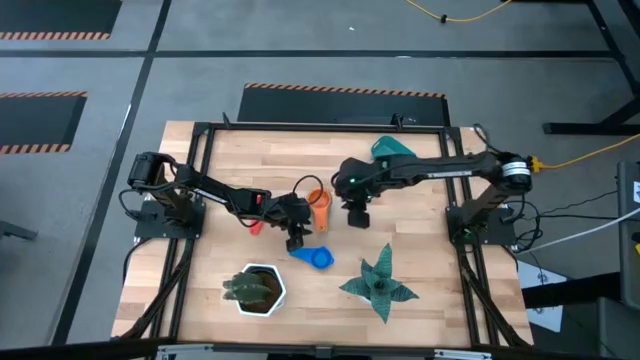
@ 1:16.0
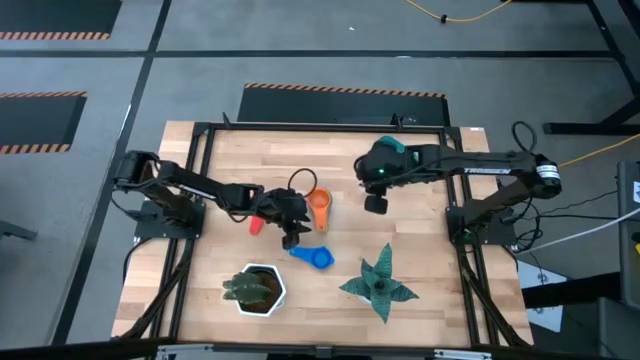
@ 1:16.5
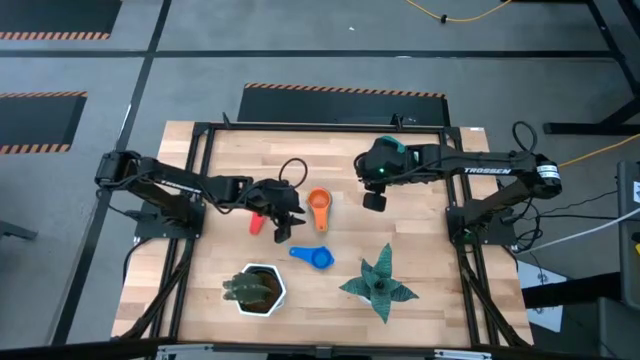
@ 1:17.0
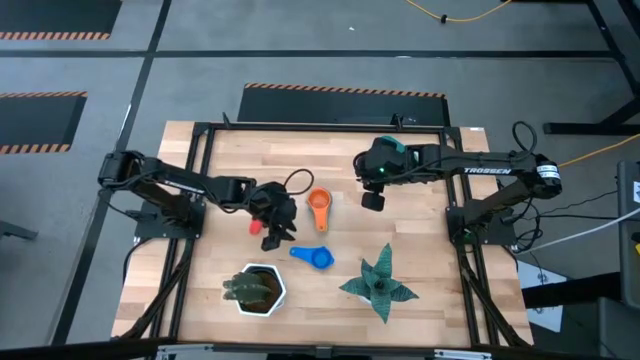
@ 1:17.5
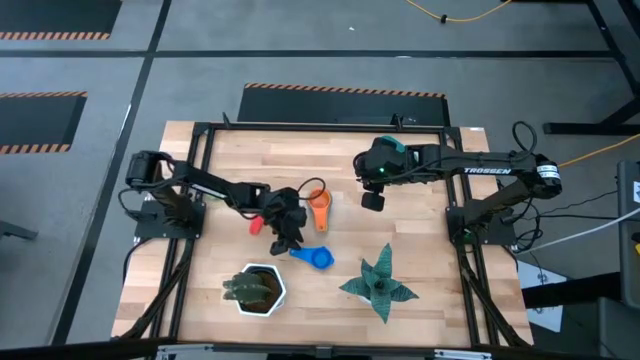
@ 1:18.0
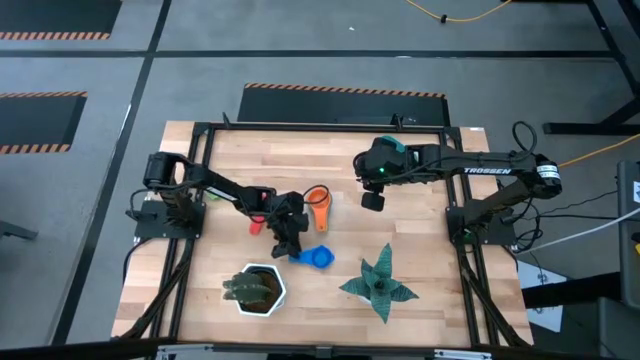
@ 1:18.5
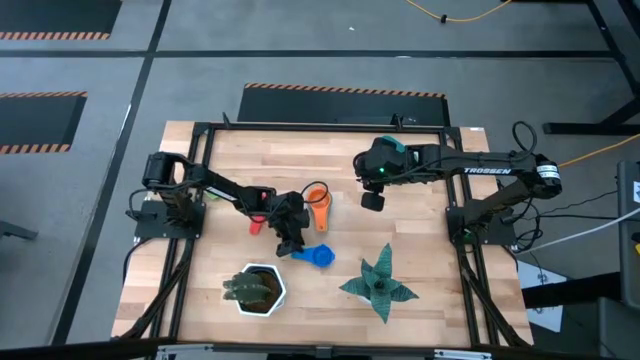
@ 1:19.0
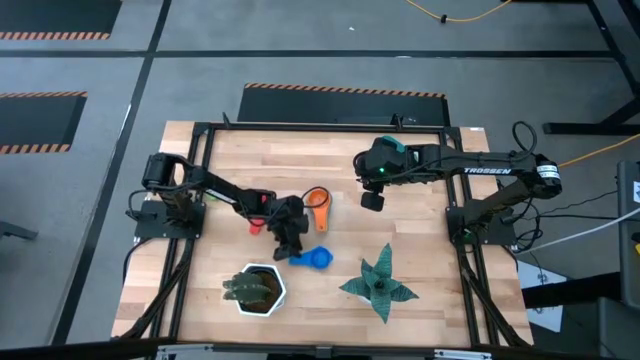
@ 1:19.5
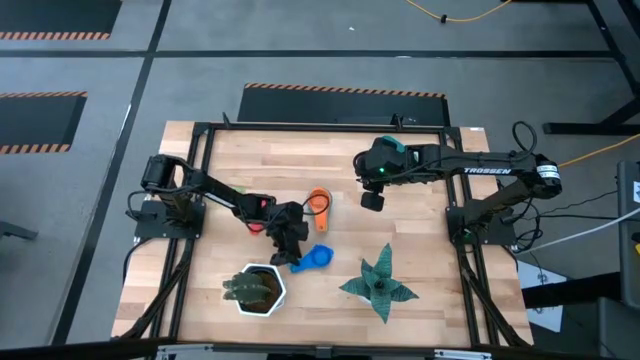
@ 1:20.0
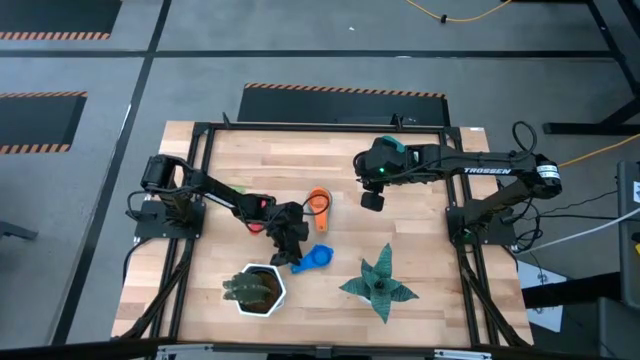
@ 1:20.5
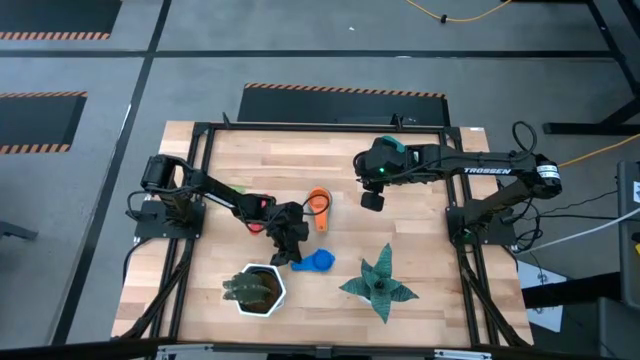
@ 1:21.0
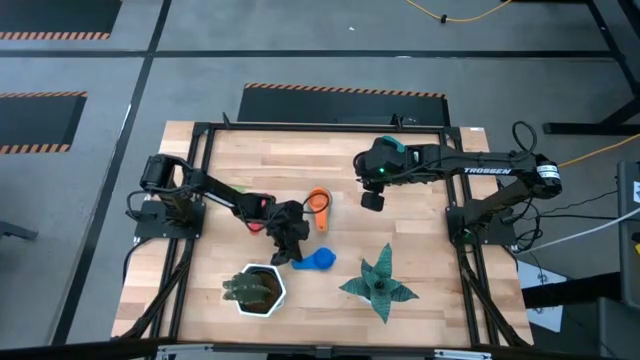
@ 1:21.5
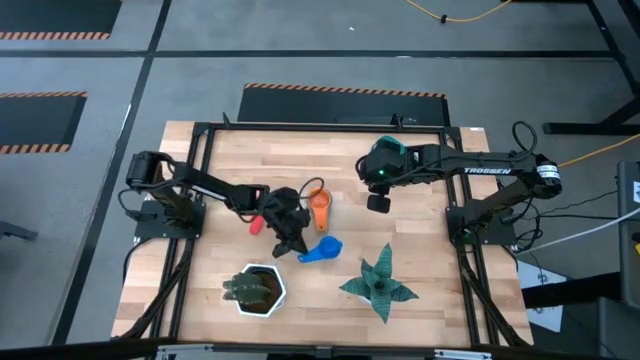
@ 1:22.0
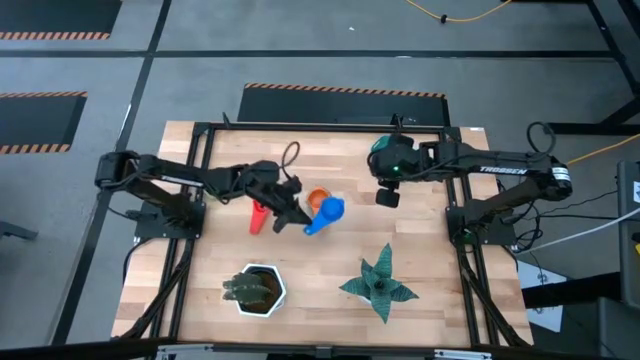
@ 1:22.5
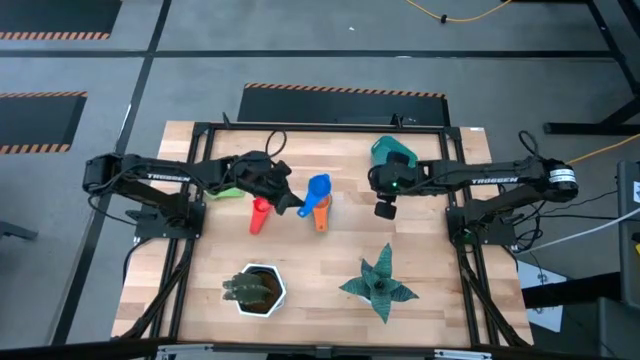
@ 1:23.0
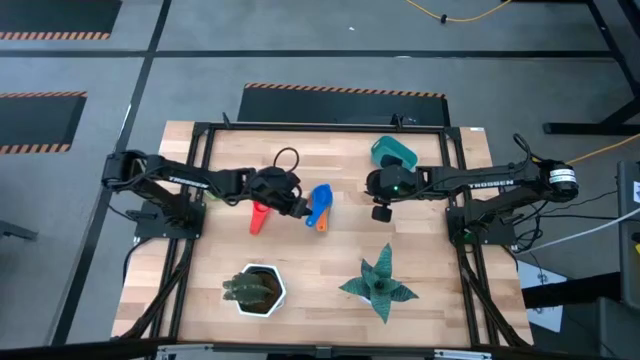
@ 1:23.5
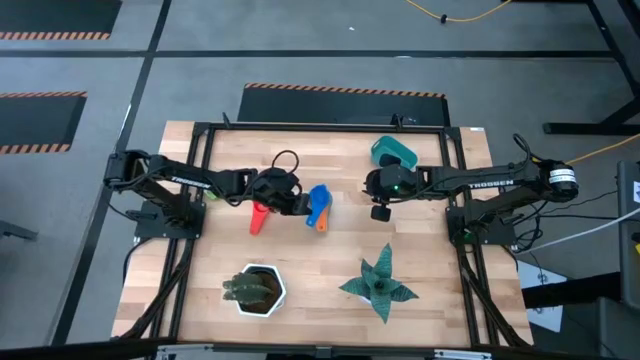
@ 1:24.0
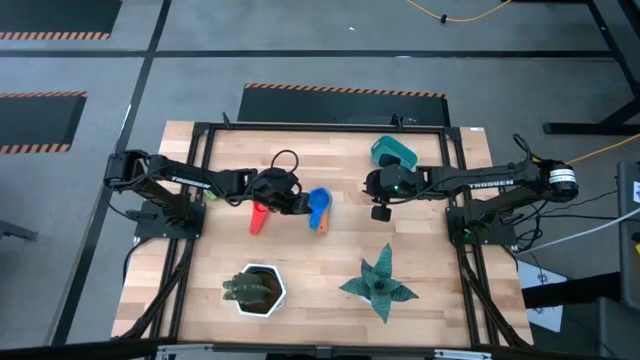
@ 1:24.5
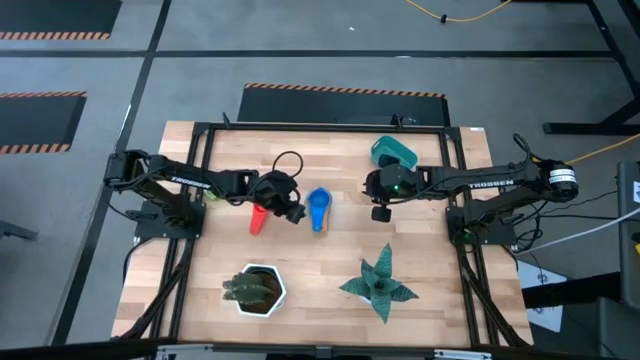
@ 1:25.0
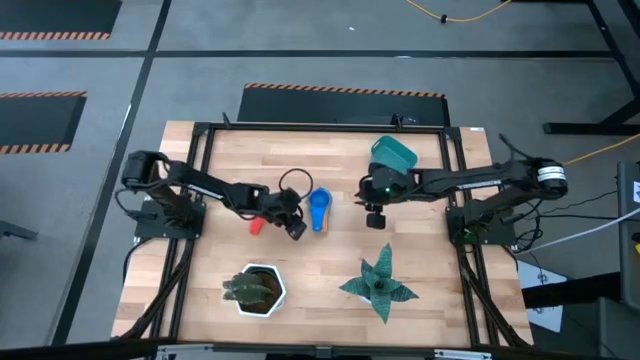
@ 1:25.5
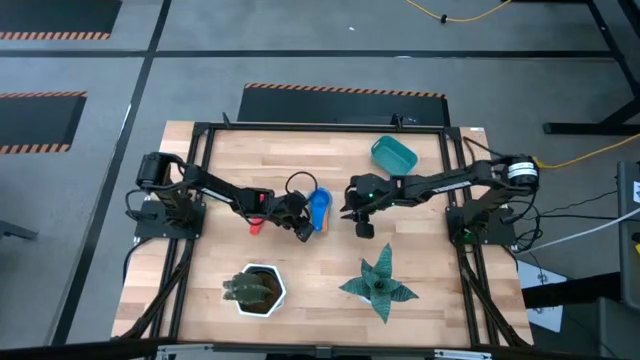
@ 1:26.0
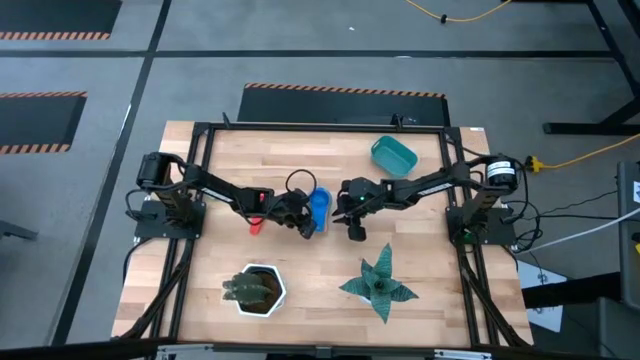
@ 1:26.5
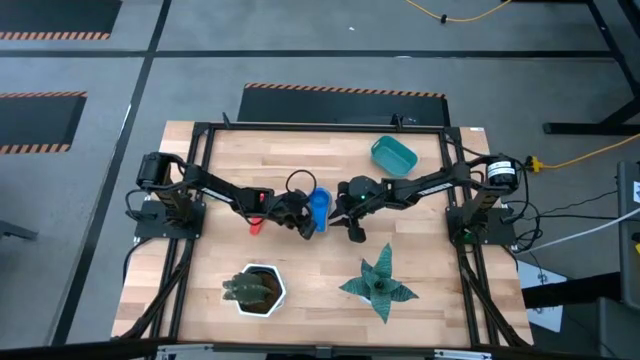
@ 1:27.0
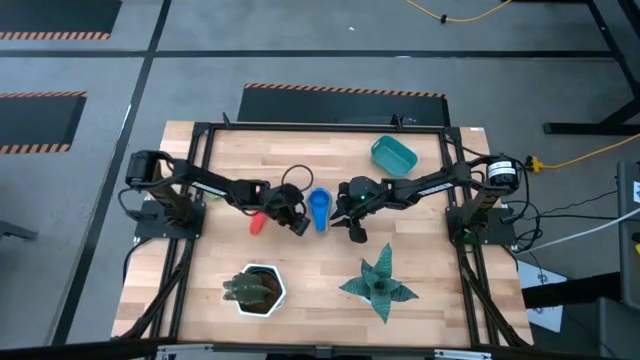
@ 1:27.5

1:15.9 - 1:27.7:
Task: Nest measuring cups in basket
Stack the blue measuring cup on top of the orange measuring cup

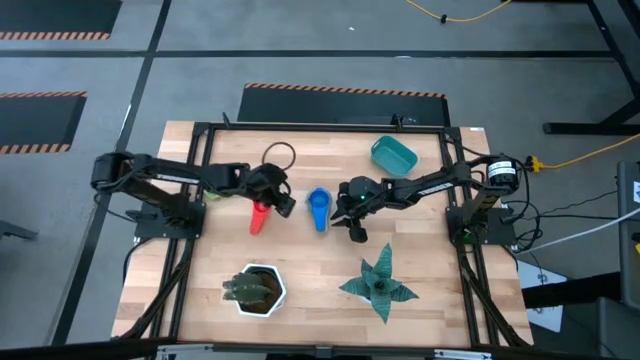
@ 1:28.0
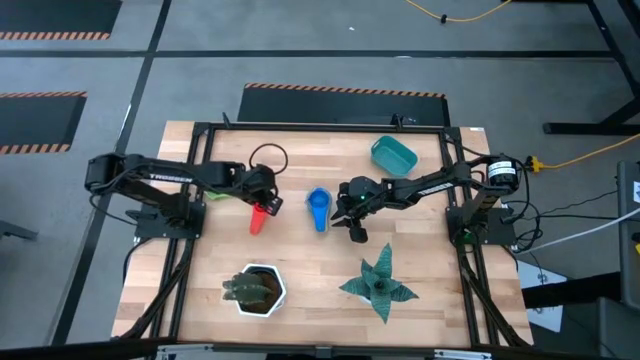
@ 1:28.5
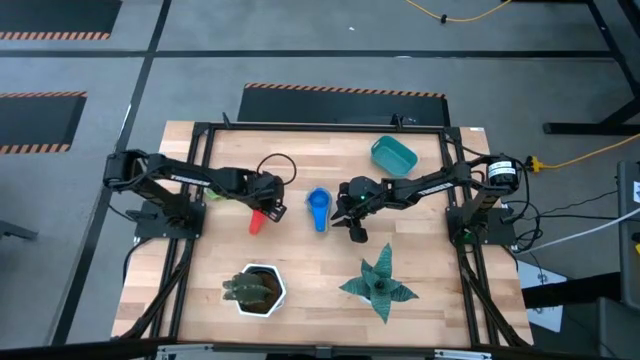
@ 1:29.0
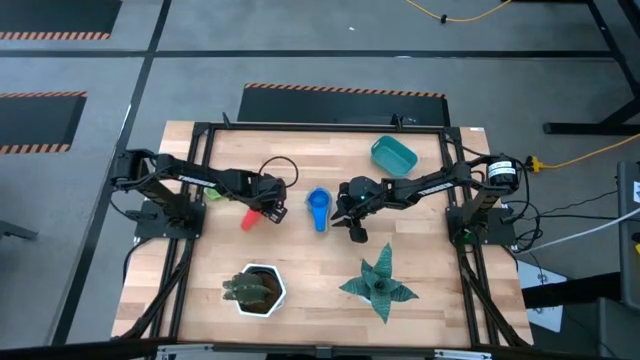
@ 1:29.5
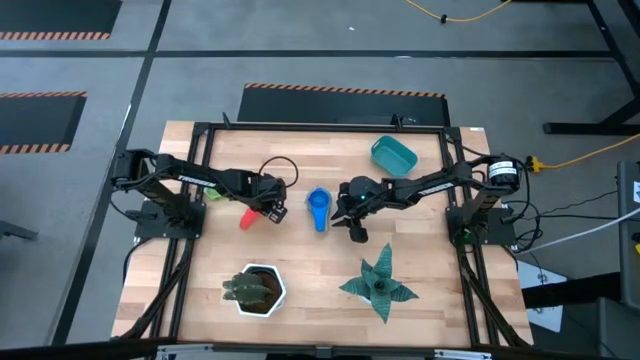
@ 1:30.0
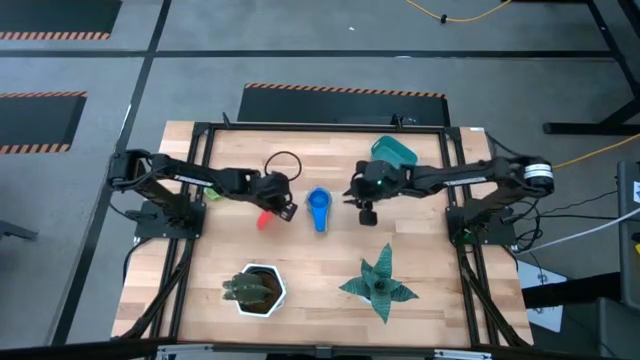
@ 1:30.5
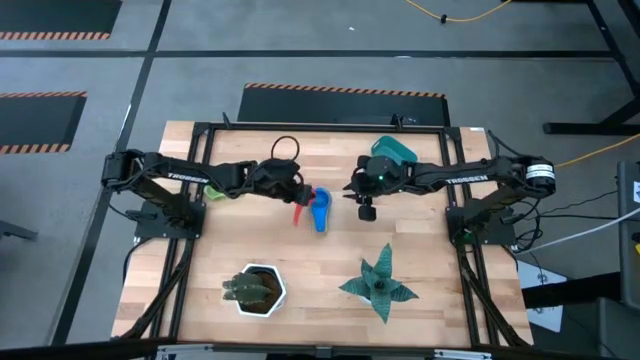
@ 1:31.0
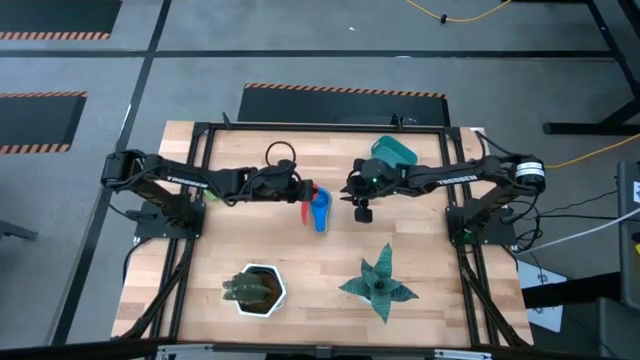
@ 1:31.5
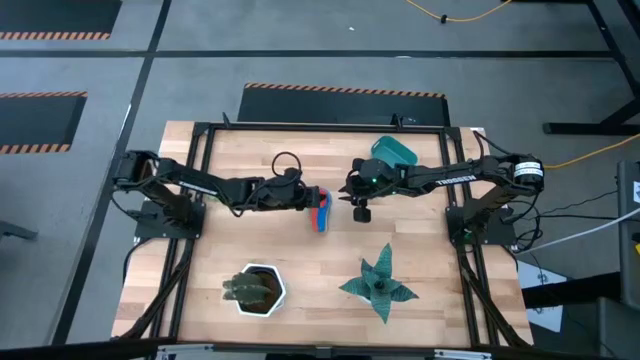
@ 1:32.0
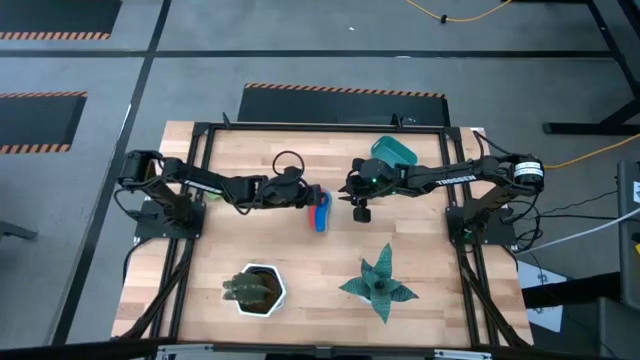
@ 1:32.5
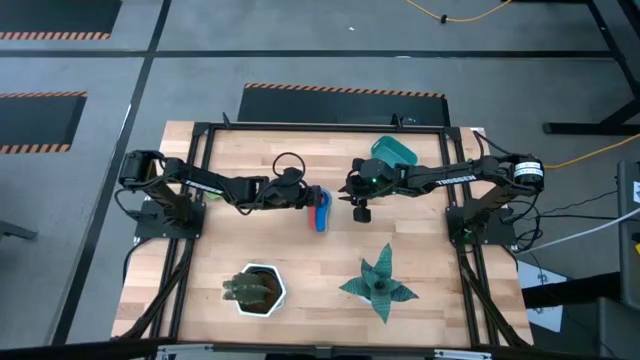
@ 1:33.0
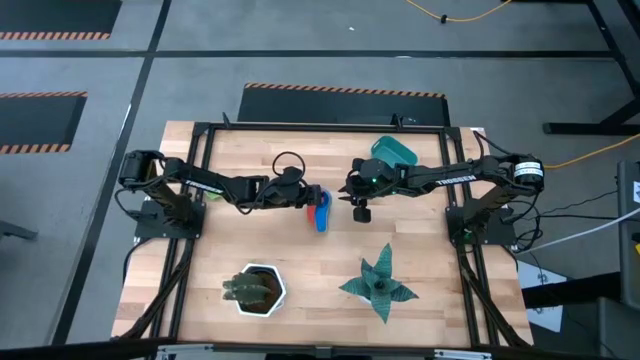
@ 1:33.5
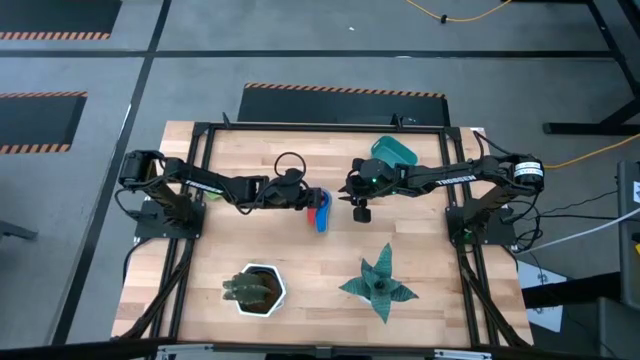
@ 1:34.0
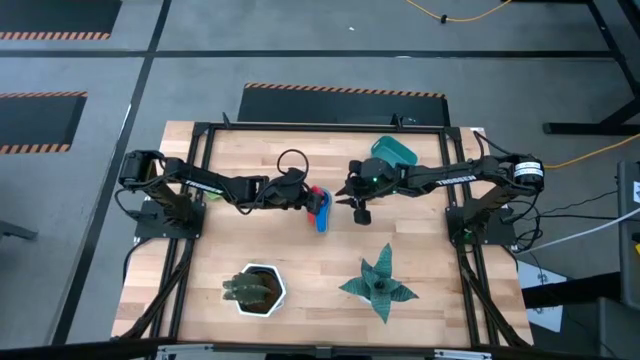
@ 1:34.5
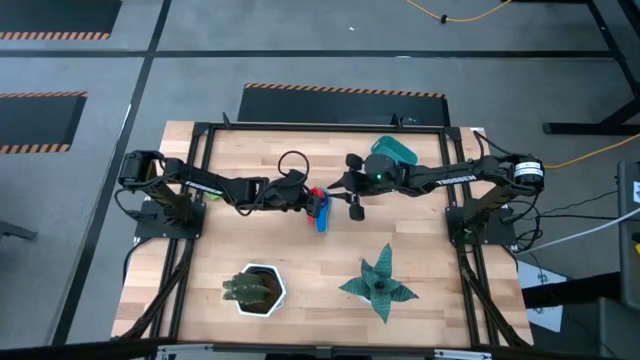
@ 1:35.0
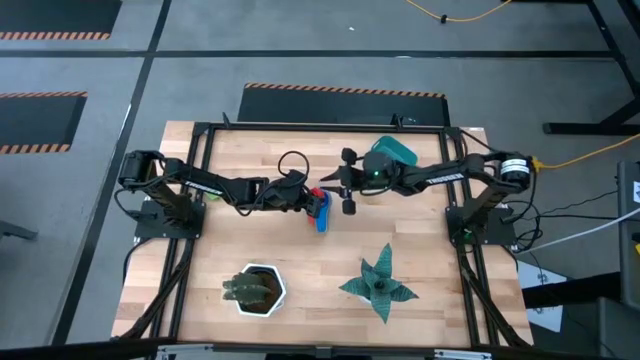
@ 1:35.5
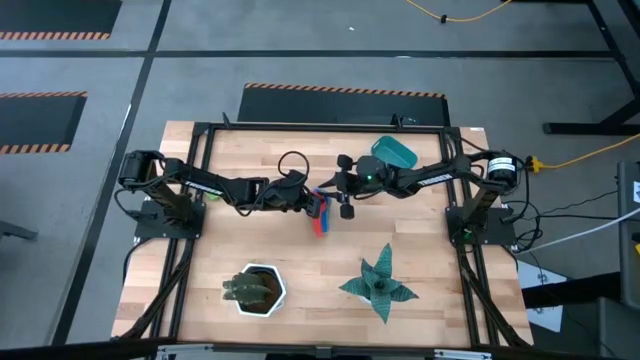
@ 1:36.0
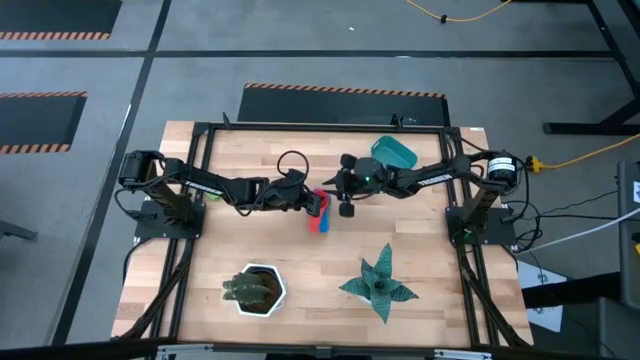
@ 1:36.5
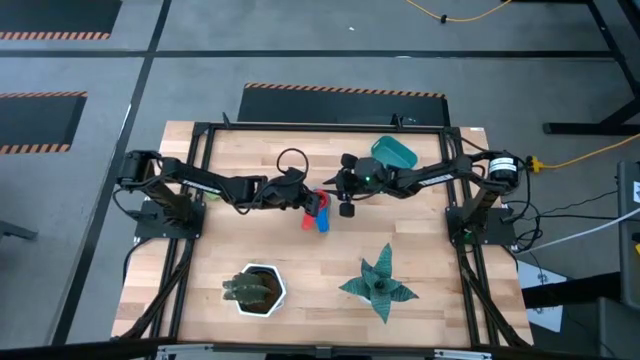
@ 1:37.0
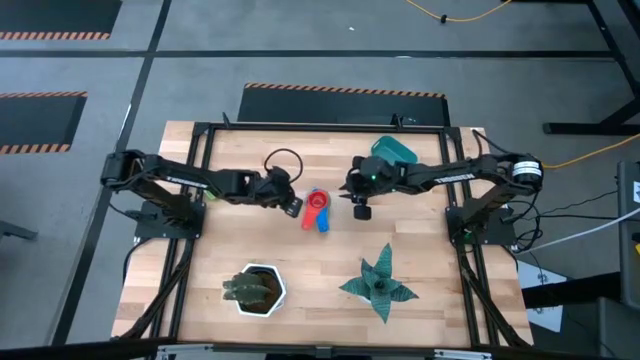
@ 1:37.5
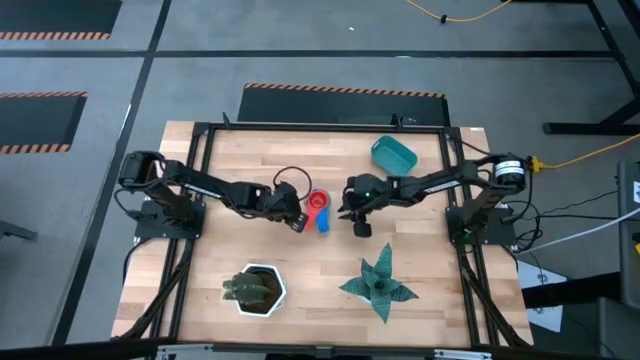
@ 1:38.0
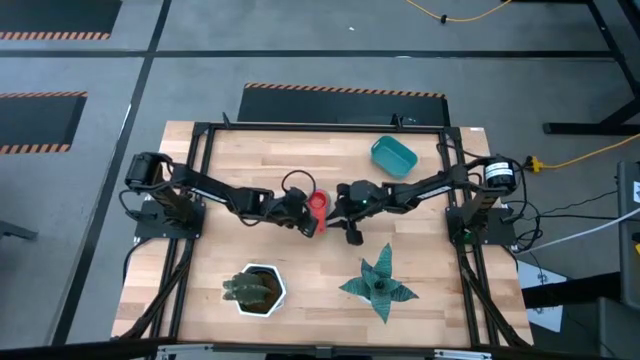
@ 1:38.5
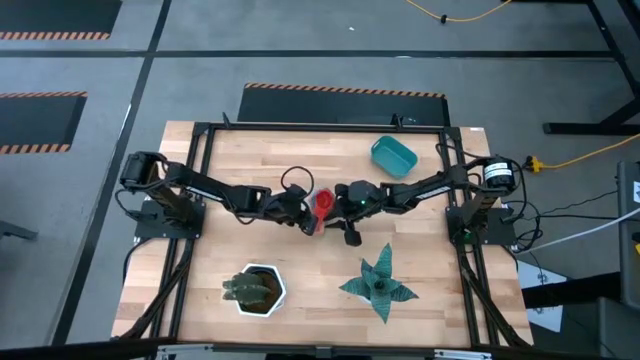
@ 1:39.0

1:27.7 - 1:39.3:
Stack the red measuring cup on top of the blue measuring cup
